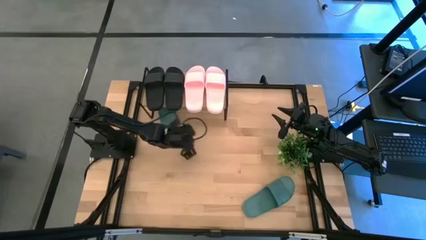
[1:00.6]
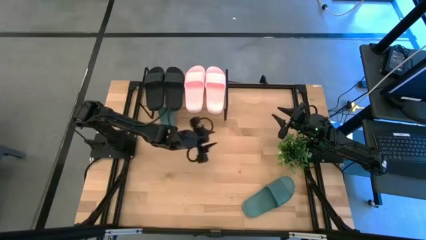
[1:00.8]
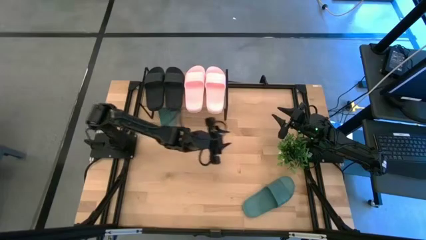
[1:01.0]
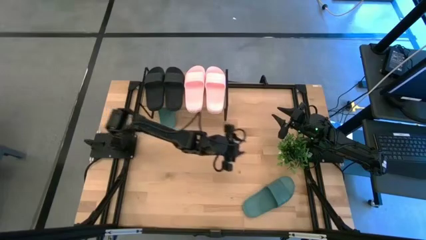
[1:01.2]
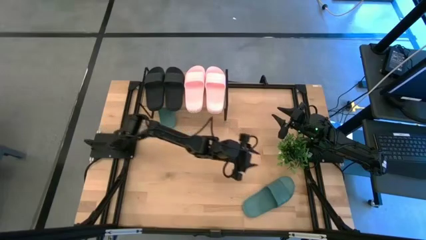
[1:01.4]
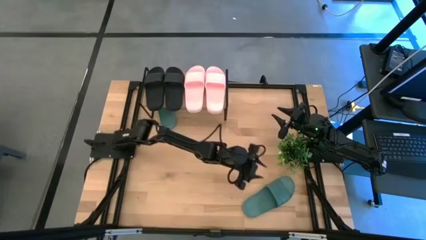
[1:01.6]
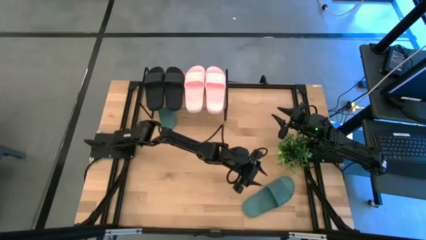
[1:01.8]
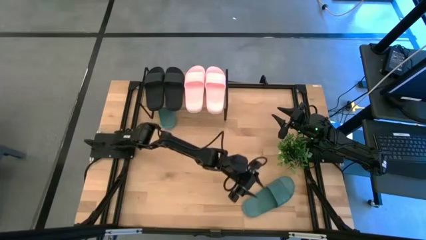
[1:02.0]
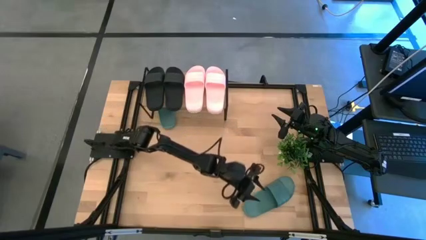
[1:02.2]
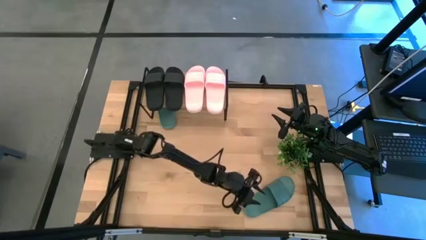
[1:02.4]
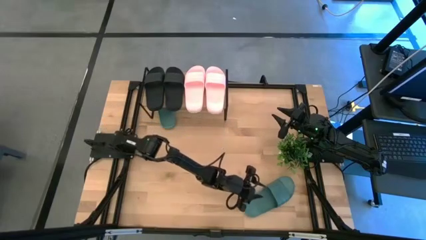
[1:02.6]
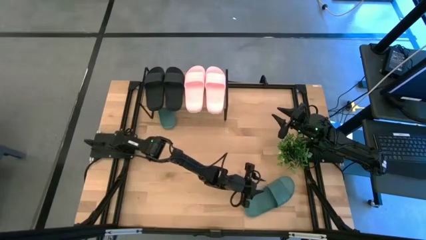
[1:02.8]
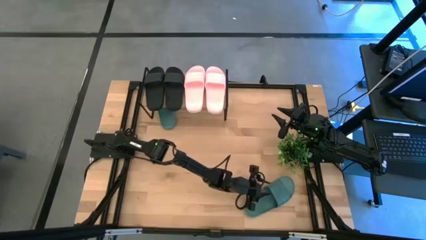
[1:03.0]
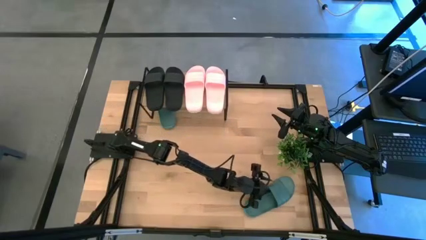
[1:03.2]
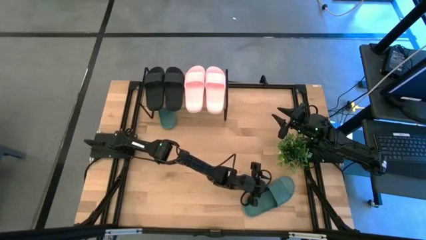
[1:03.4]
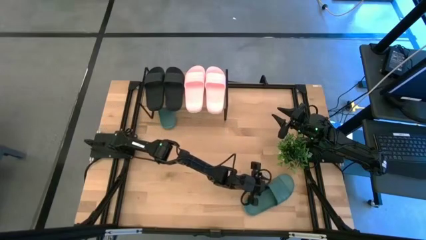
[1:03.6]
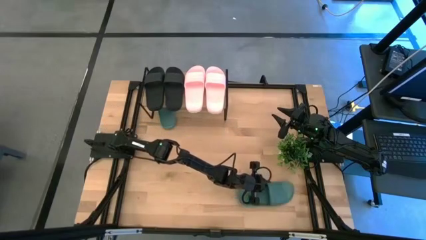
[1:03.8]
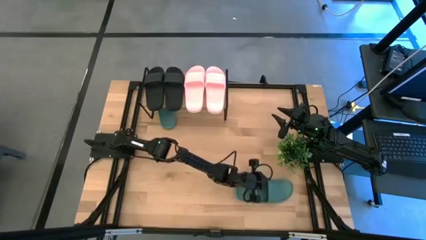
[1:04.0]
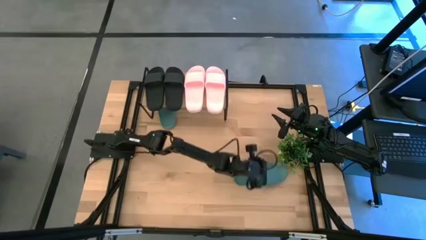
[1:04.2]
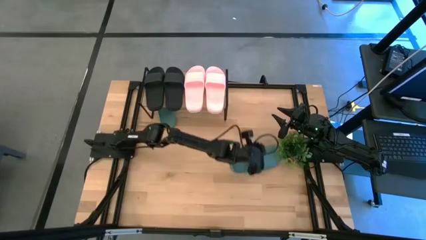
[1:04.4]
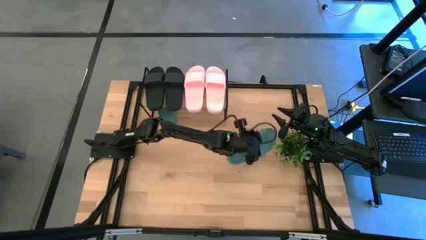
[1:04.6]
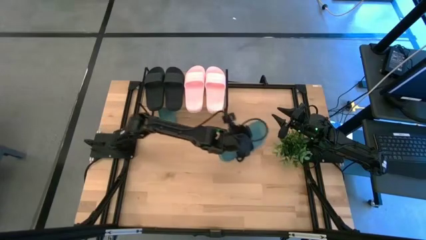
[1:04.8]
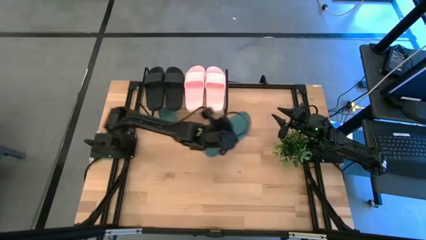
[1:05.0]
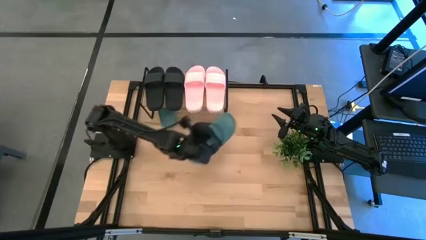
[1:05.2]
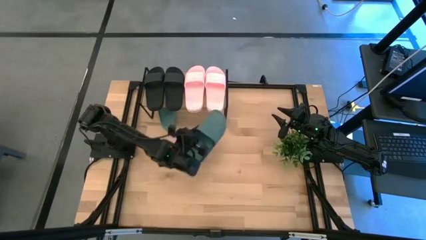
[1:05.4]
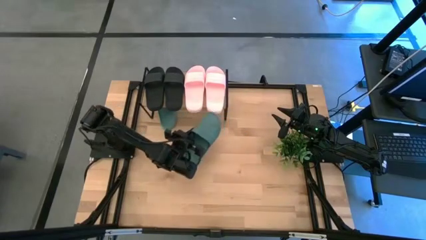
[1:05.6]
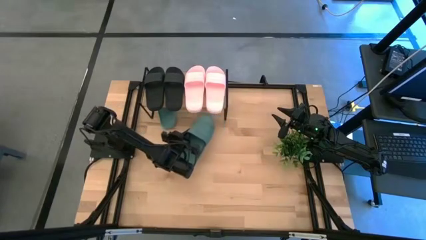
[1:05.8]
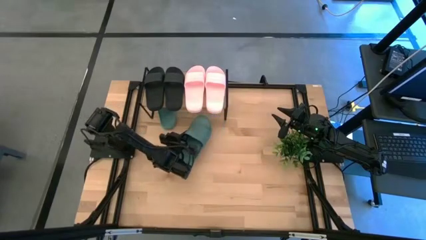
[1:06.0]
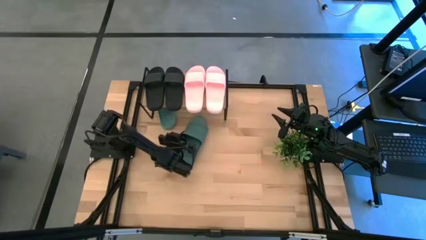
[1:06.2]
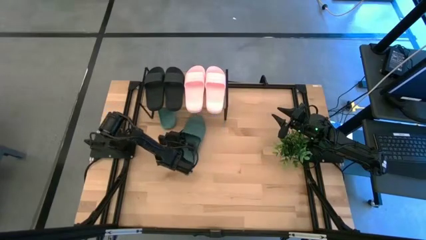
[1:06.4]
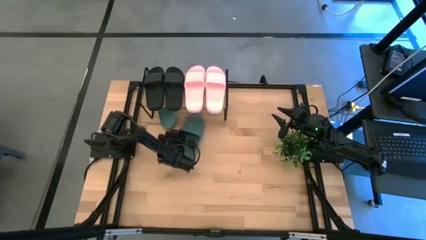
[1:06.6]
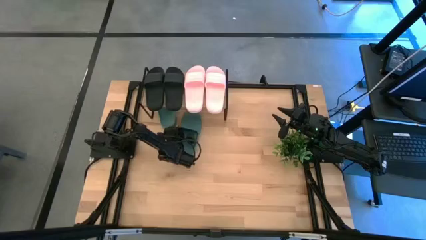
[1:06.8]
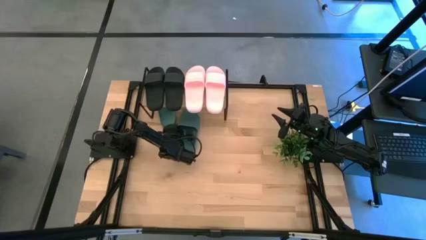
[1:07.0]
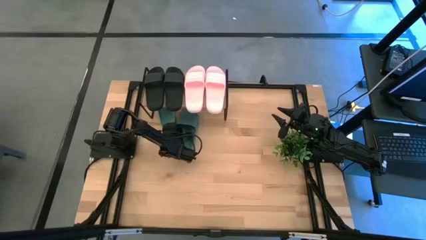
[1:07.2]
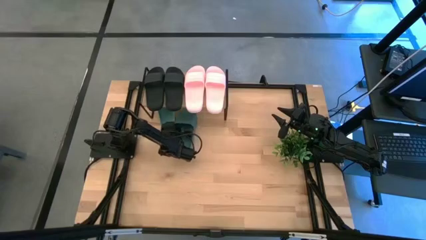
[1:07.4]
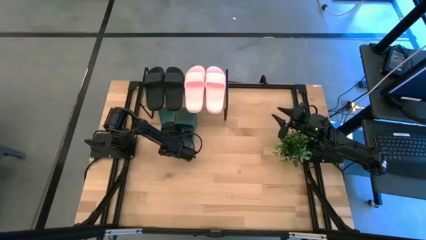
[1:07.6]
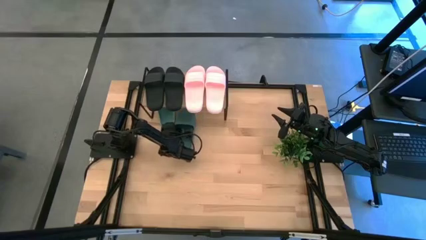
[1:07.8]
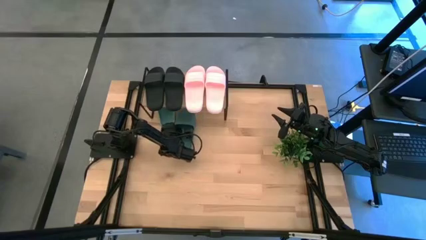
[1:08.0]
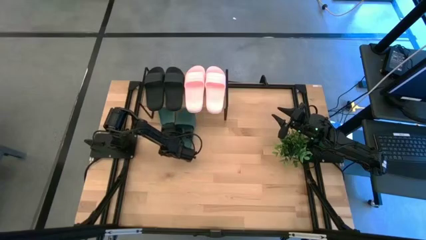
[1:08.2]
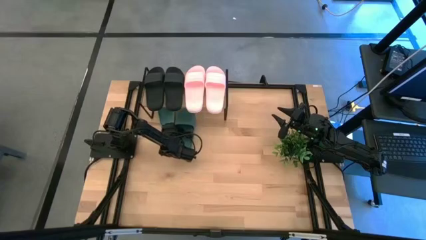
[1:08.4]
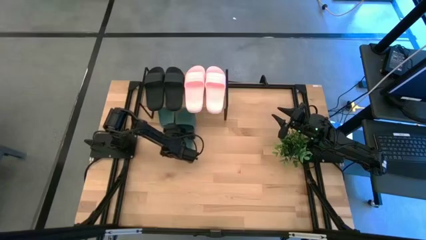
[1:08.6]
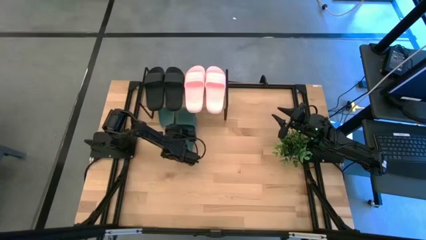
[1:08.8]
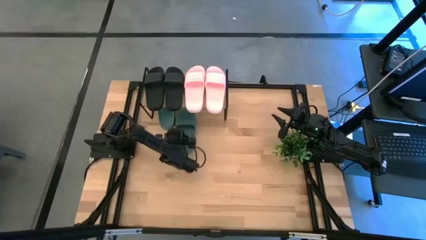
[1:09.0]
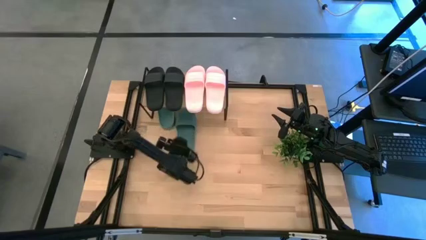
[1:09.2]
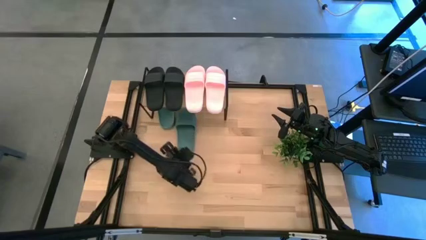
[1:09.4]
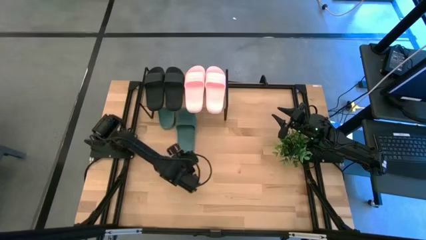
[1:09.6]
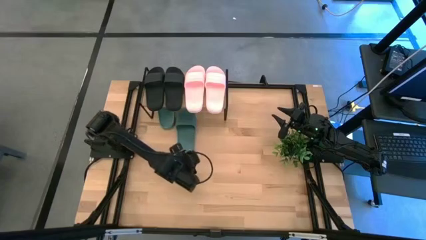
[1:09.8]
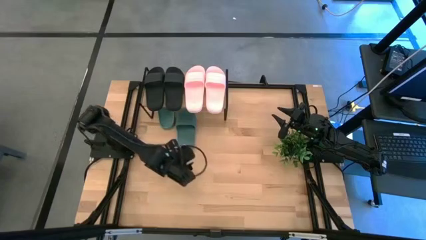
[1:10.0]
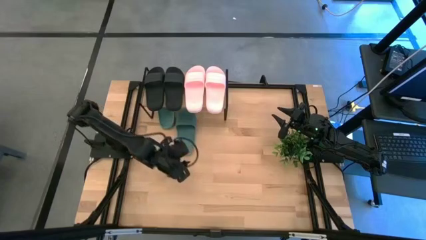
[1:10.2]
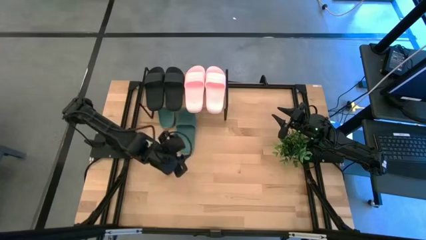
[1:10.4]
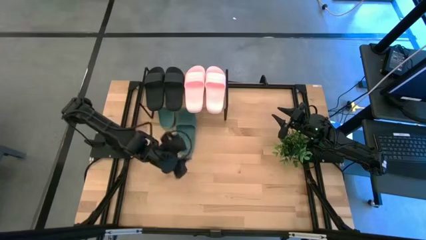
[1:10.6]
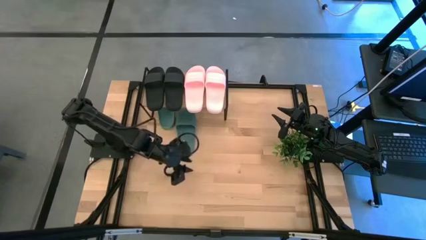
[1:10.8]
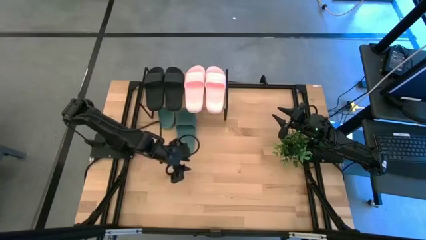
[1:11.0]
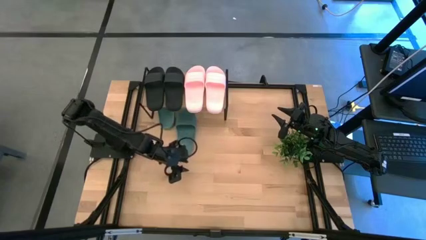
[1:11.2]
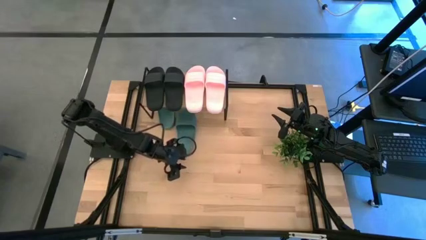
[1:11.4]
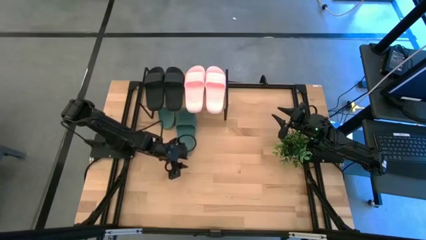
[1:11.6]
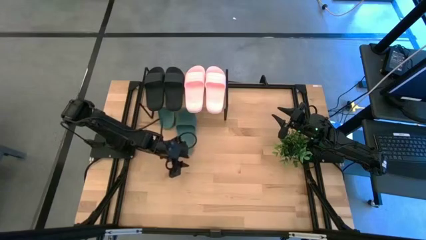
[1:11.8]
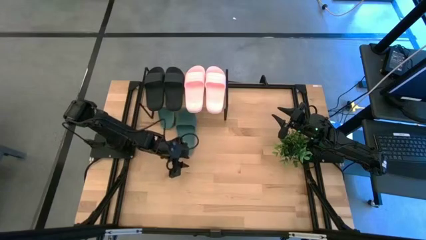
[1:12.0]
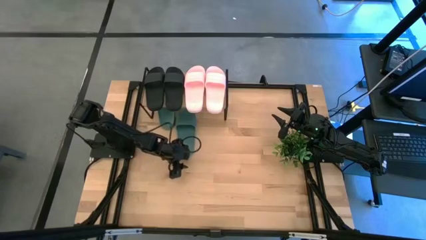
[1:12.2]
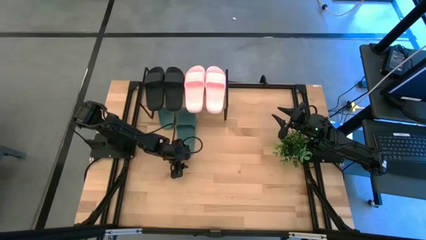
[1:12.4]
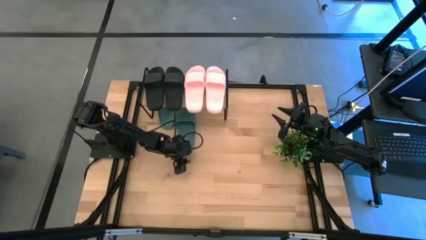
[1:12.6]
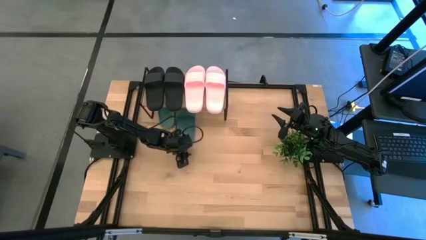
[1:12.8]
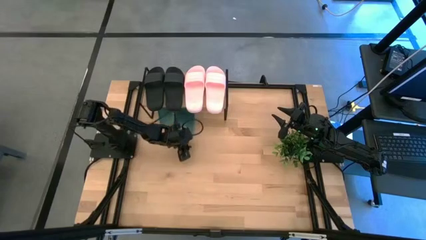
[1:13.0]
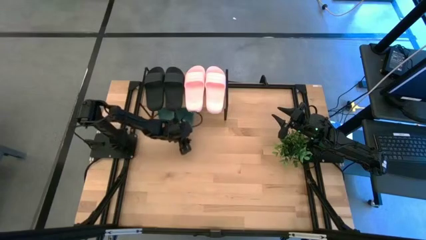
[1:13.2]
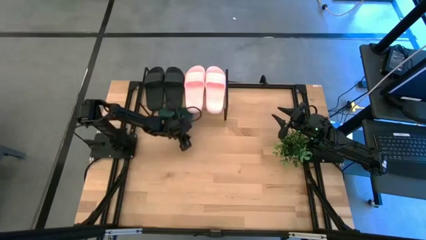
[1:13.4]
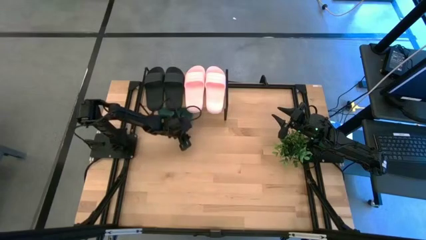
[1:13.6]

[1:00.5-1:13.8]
Task: Pick and place slides into the shelf
Put the green slide under the shelf

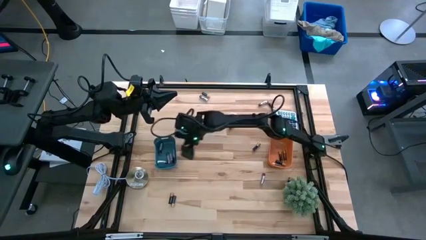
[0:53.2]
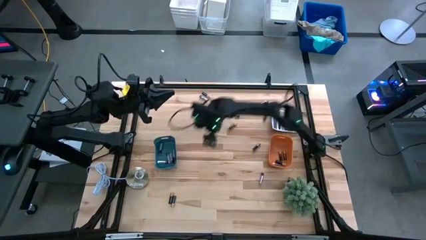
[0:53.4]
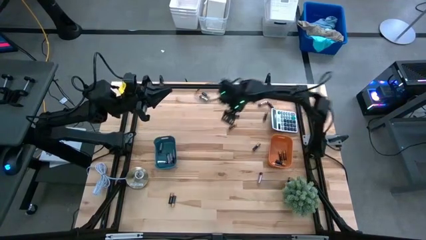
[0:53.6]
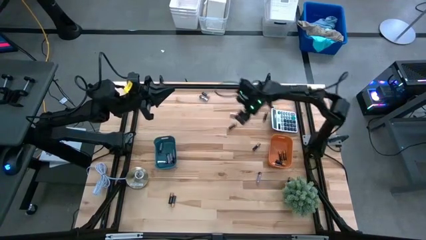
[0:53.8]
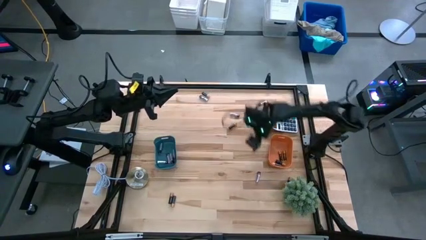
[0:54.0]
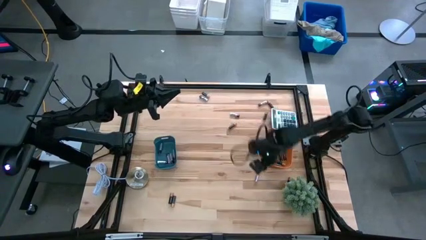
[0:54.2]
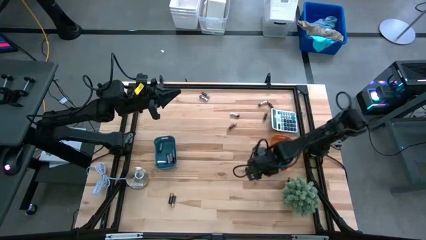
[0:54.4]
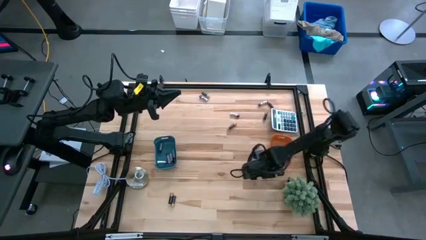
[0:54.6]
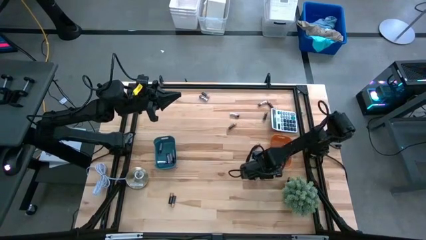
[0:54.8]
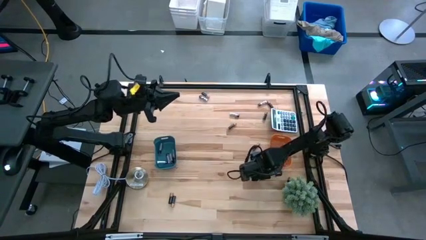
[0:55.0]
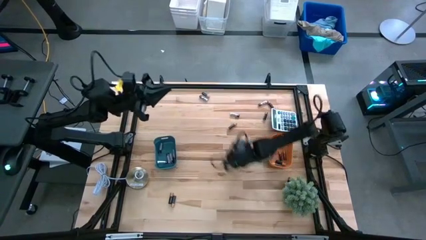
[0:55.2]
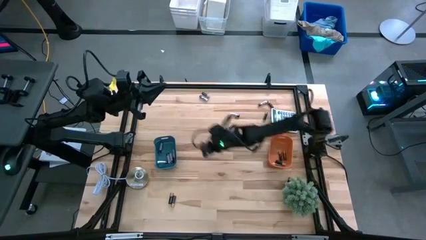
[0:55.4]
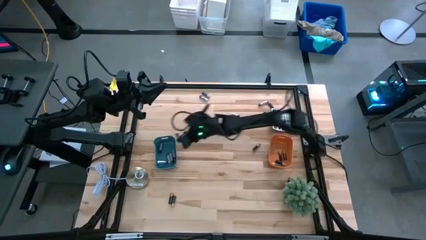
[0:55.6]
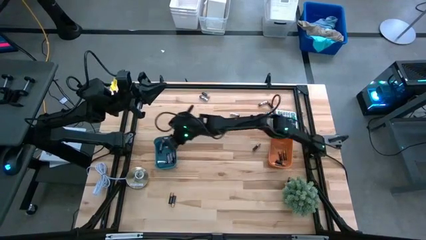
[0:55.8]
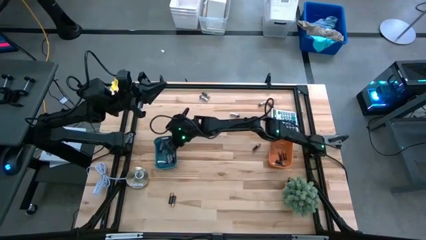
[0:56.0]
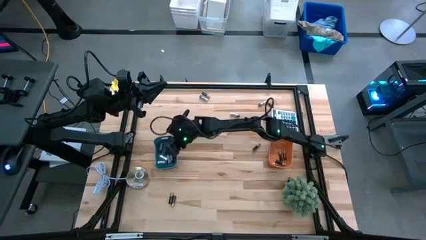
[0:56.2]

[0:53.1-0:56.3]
Task: Sort batteries
Put the silver battery into the blue bin

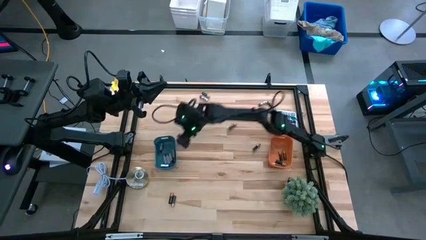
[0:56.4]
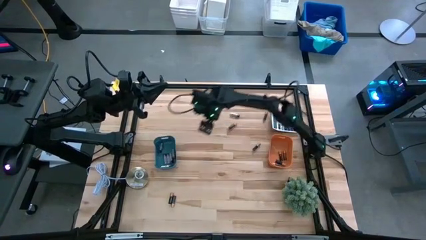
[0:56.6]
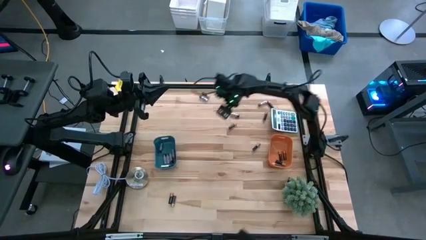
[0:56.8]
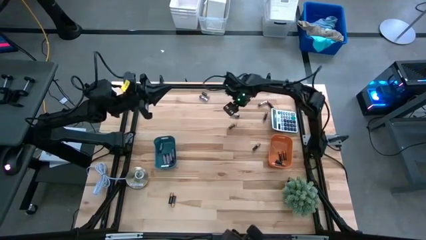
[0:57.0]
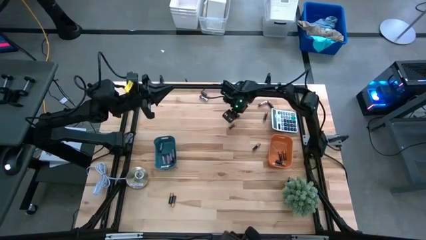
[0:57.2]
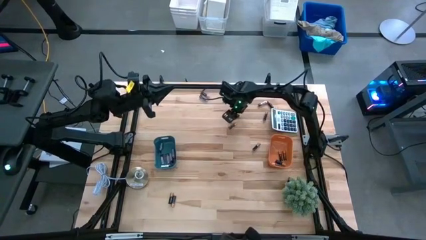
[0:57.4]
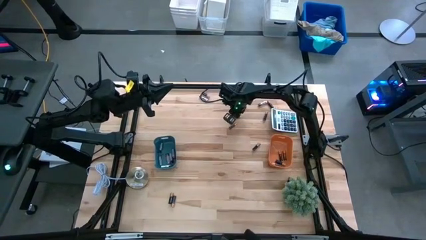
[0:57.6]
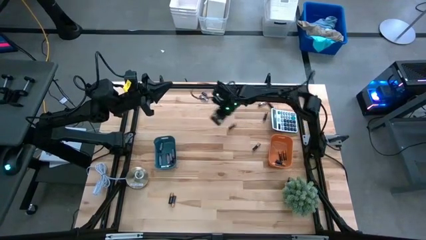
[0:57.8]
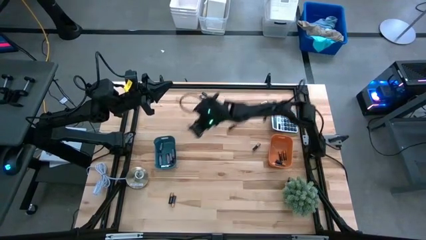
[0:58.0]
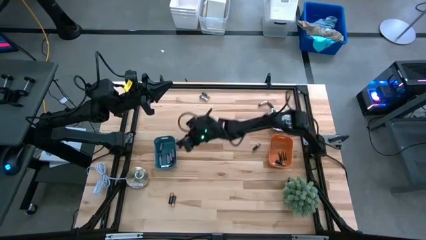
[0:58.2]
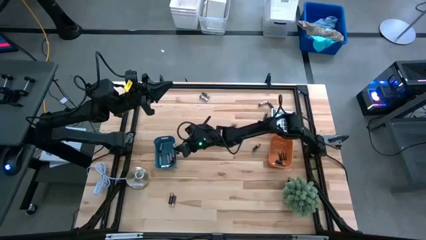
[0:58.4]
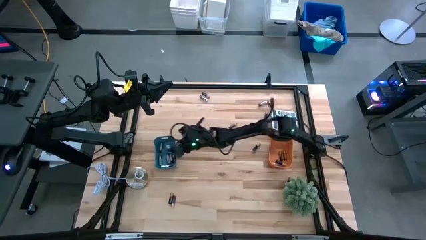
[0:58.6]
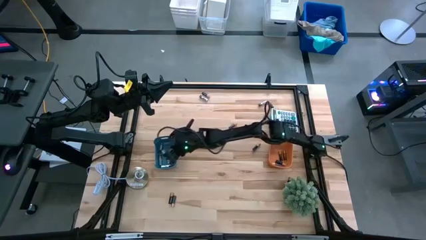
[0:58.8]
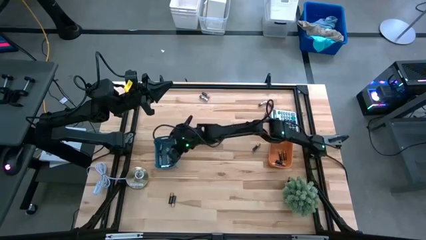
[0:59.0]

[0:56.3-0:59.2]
Put the silver battery in the blue bin
